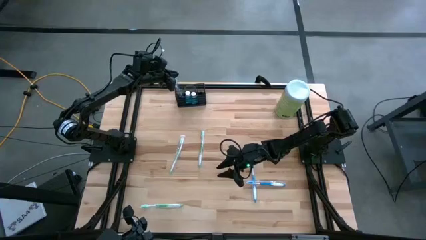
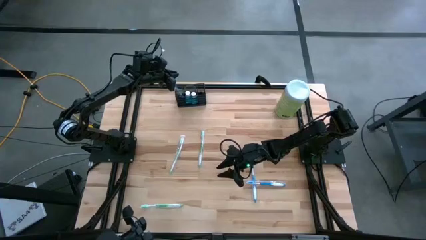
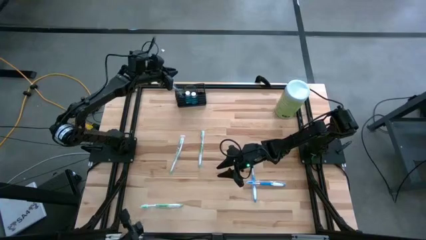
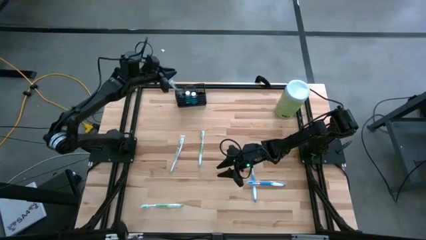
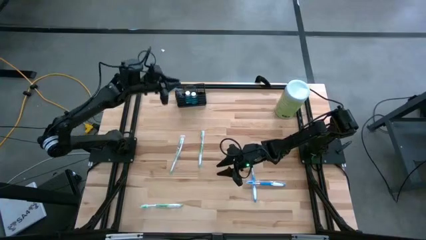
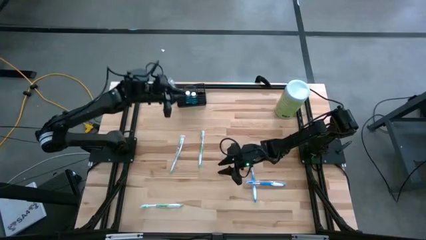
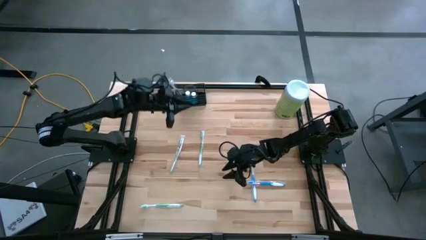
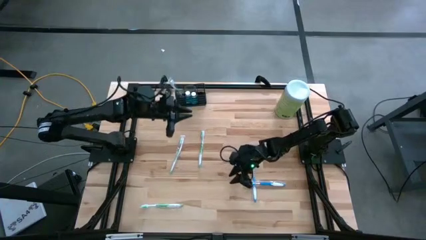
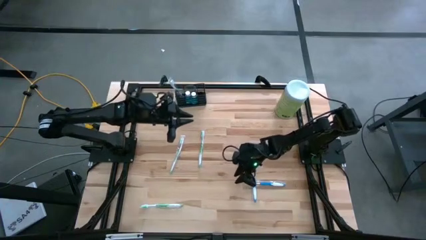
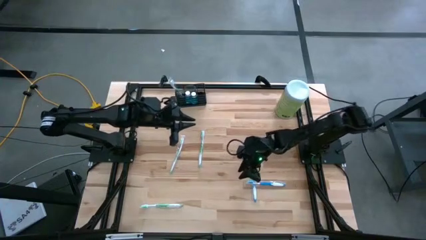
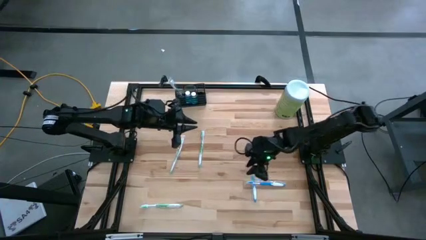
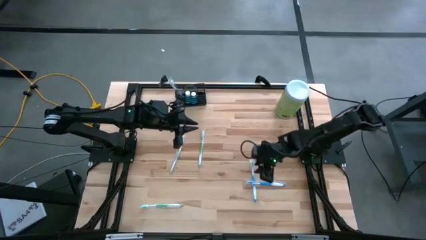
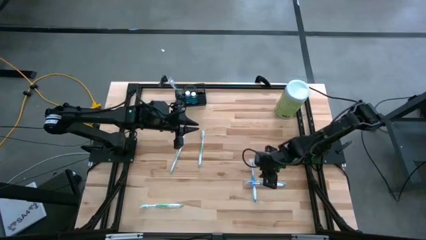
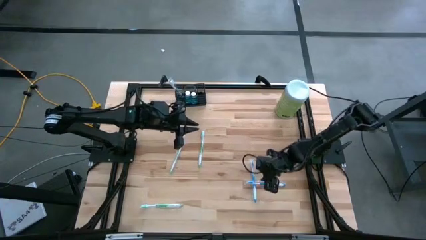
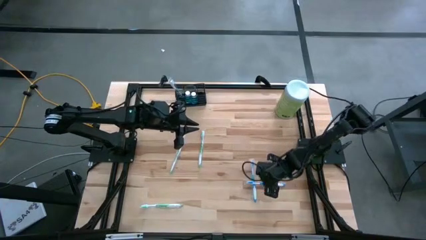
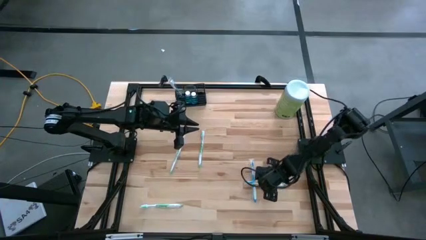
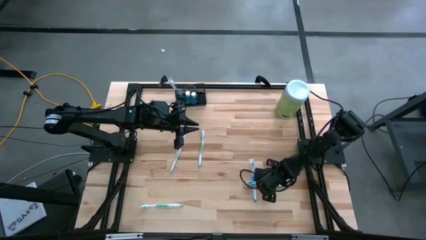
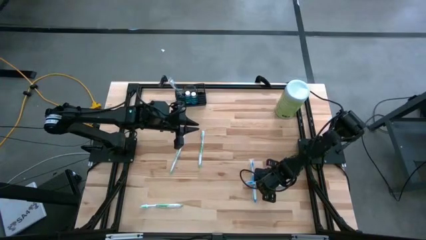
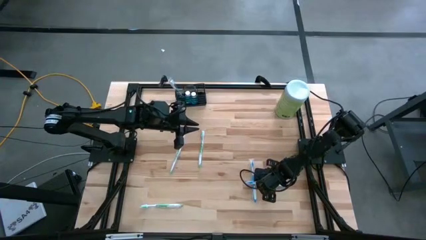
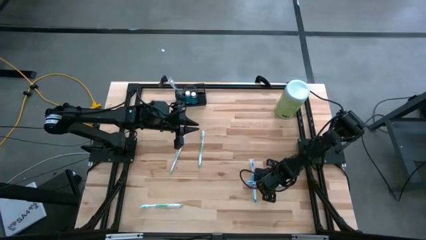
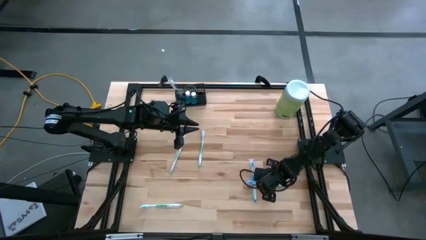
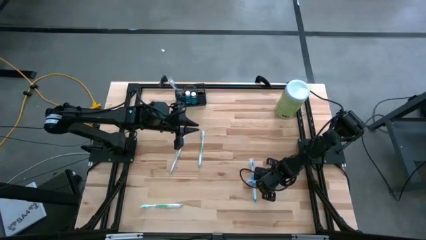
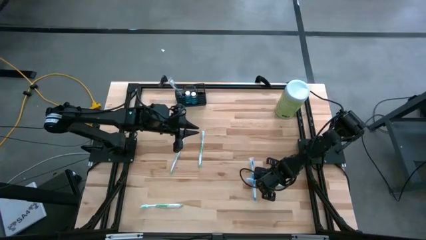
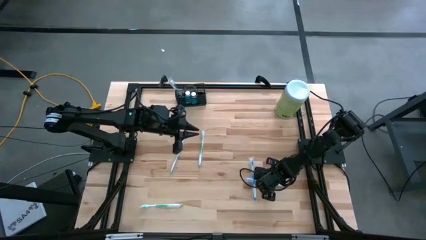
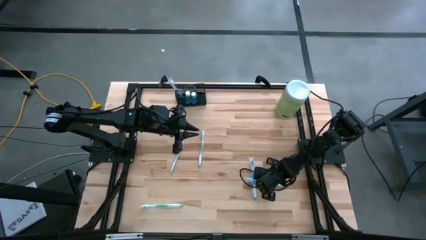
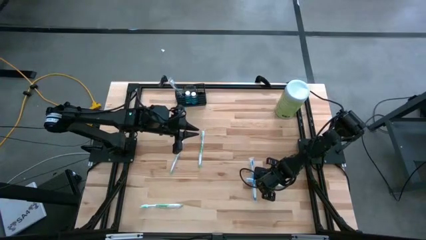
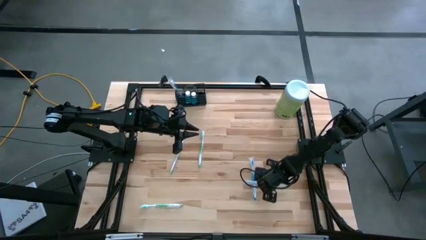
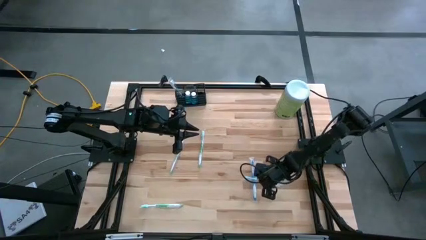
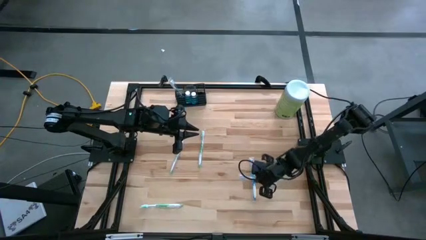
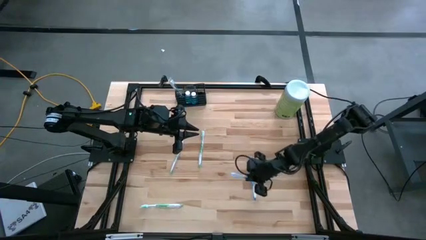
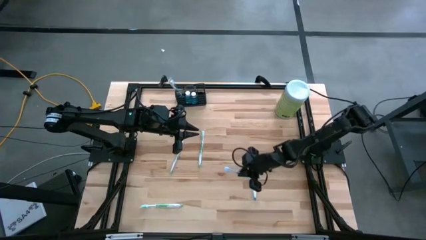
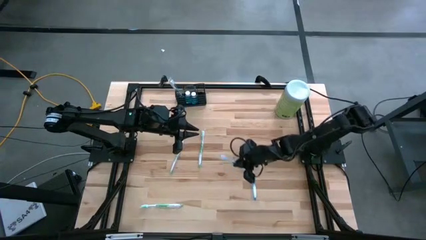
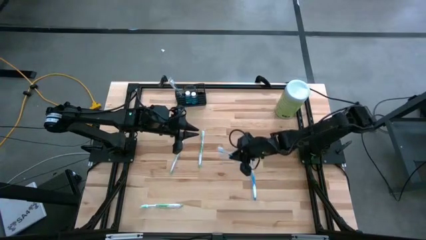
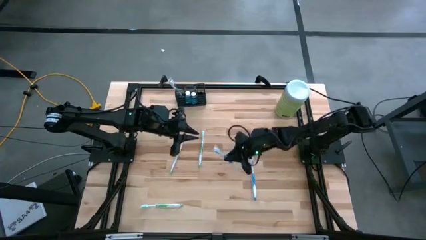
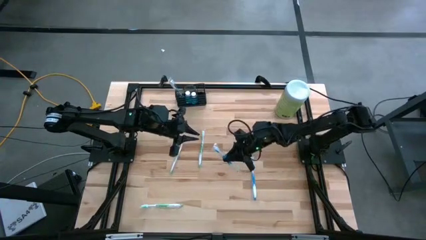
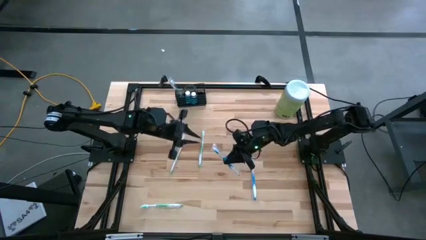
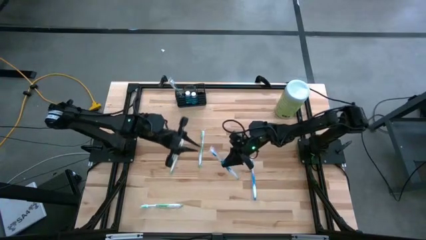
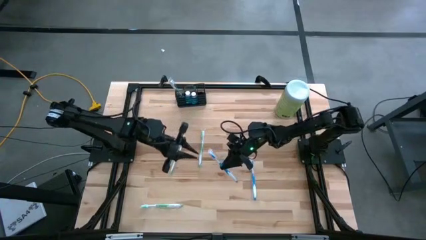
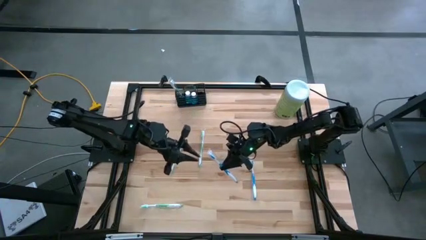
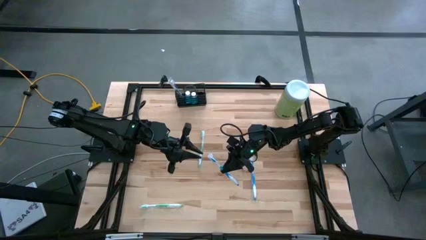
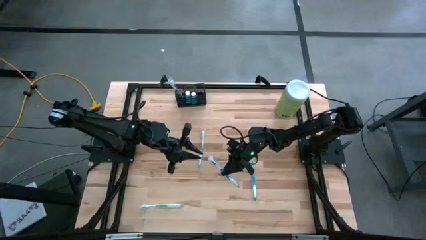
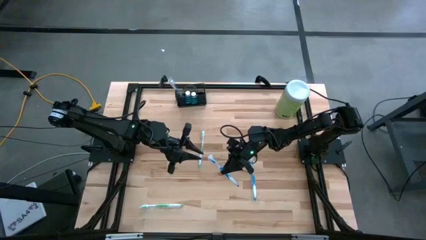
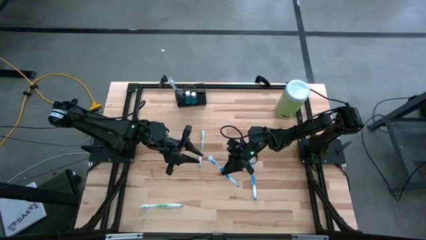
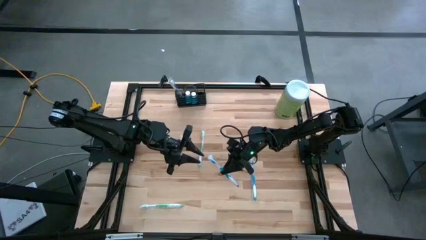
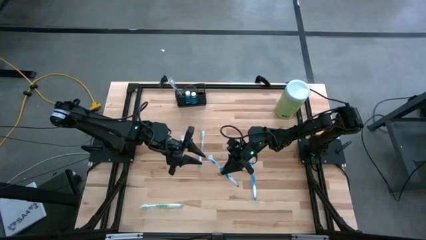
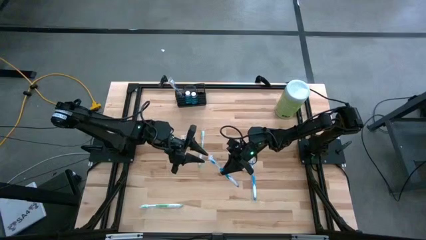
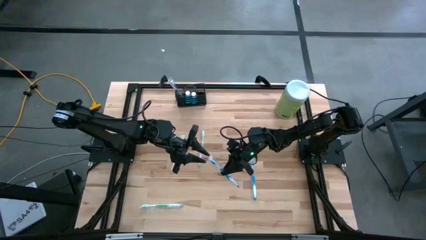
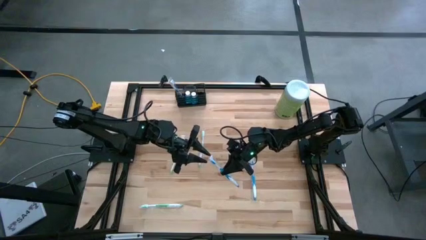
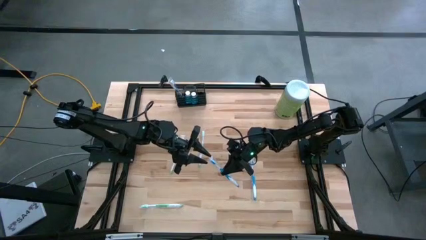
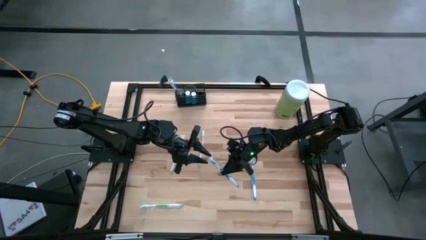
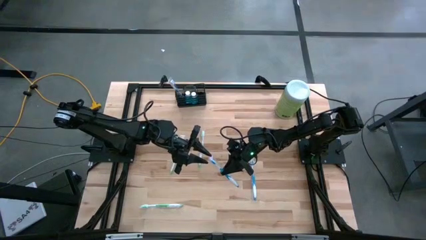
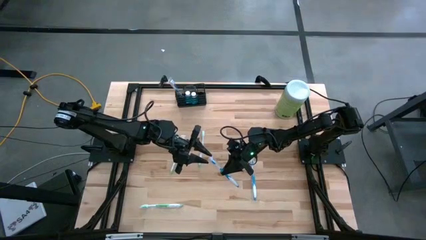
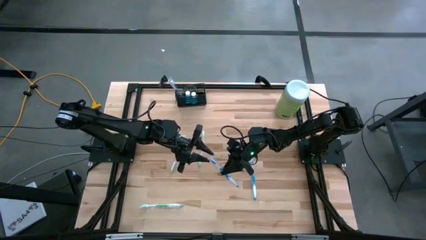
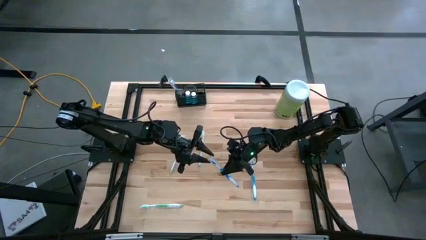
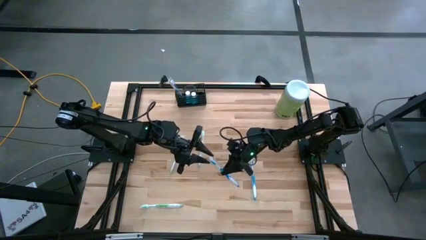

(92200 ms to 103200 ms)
Task: Pick & Place toothbrushing station
Put the right blue toothbrush into the wire organizer
